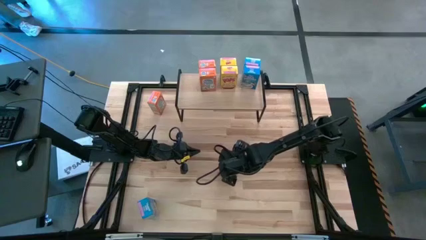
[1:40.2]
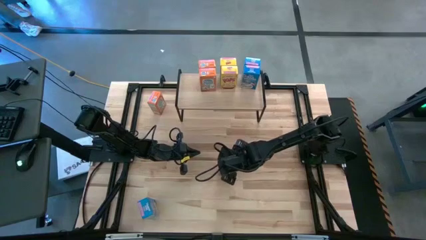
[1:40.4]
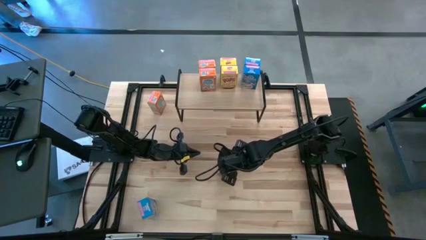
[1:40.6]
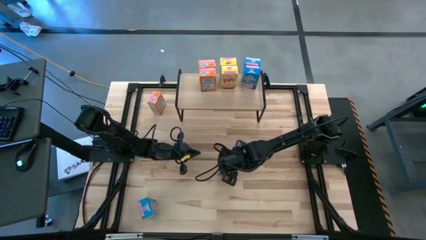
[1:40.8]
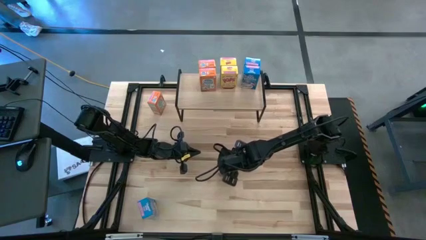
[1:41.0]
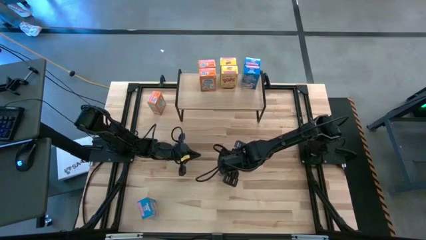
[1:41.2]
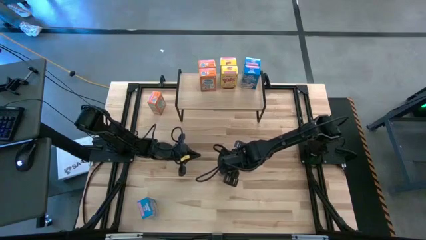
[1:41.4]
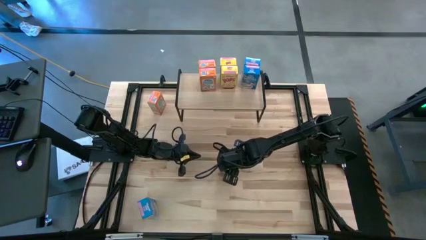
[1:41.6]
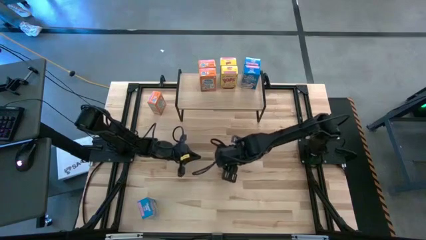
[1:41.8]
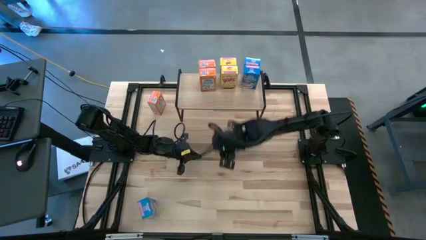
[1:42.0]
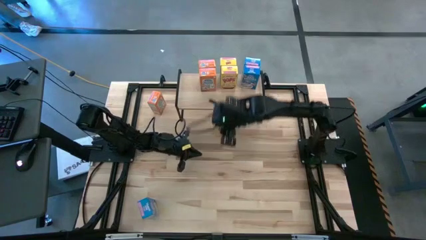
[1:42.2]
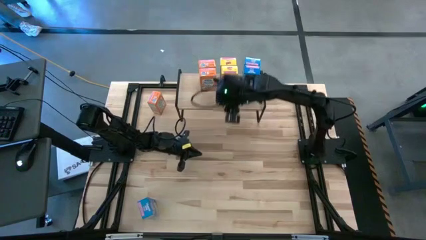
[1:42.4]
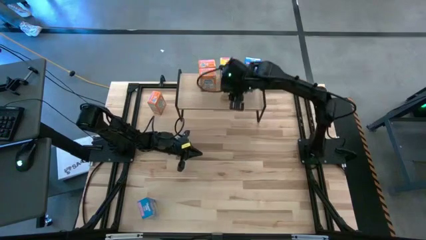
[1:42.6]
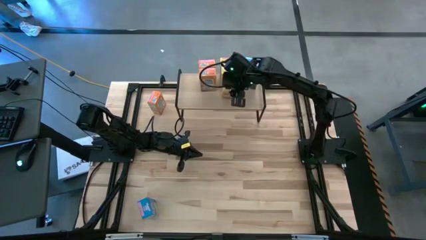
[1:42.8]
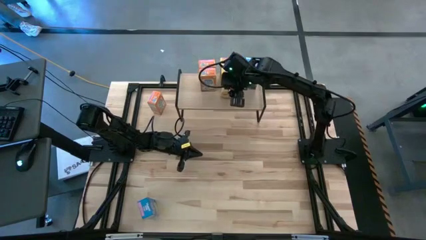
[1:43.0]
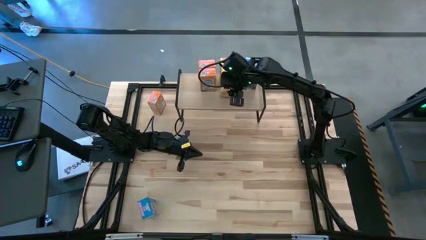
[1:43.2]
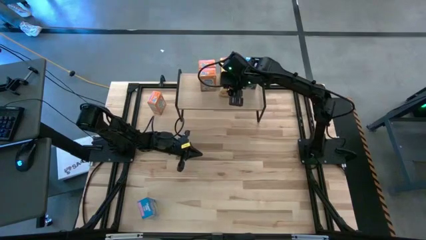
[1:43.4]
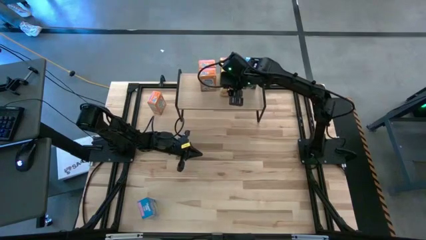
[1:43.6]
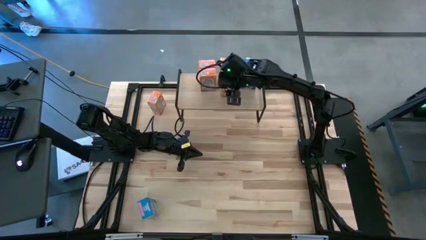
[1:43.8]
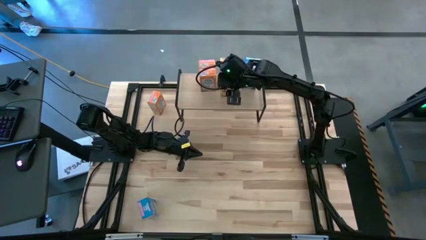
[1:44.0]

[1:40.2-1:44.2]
Task: Stack cereal on shelf
Put the yellow cereal box on the shelf aligned with the other yellow cereal box

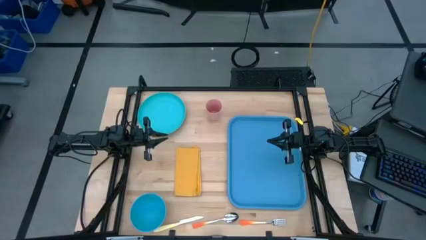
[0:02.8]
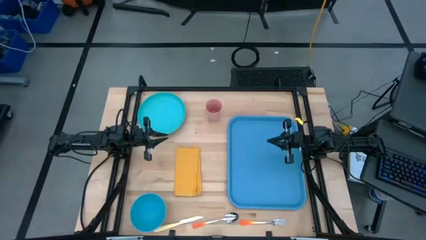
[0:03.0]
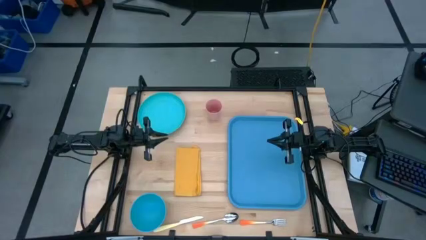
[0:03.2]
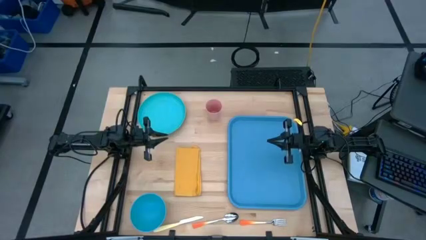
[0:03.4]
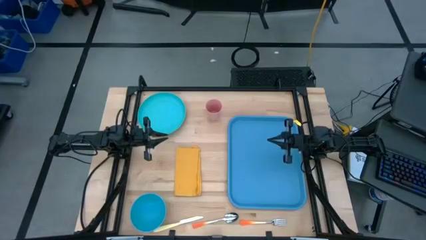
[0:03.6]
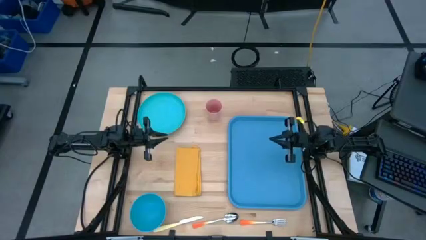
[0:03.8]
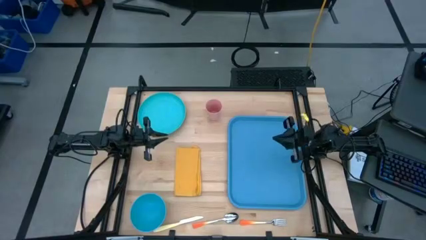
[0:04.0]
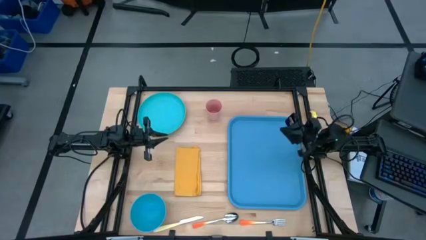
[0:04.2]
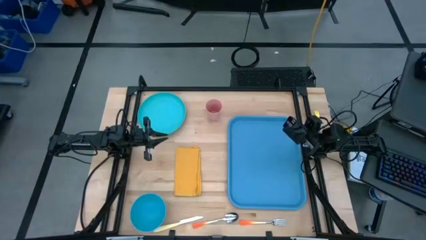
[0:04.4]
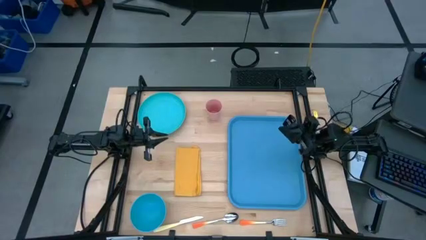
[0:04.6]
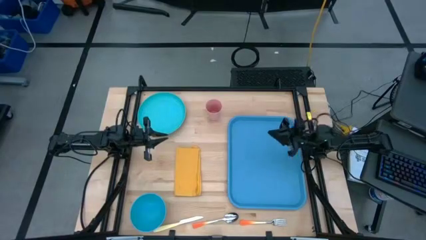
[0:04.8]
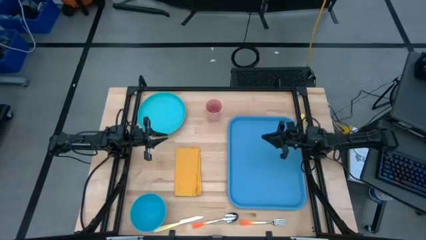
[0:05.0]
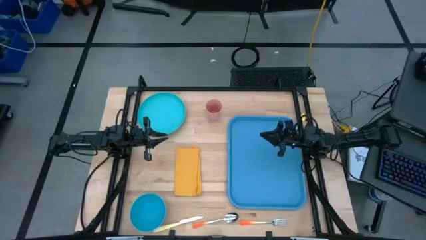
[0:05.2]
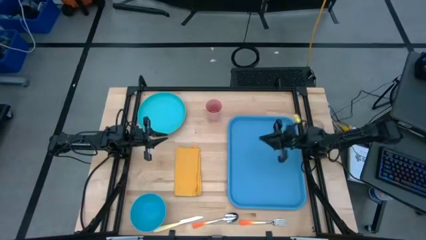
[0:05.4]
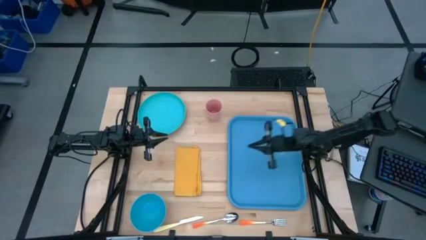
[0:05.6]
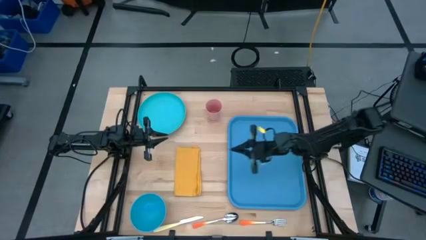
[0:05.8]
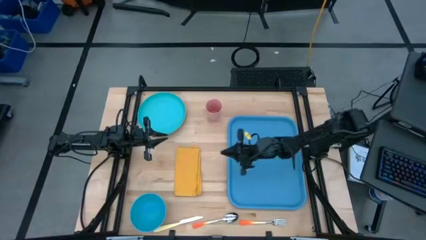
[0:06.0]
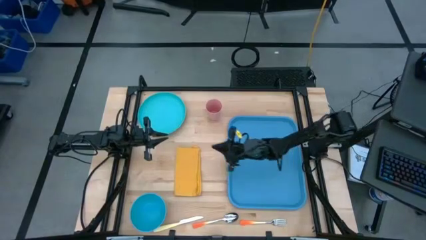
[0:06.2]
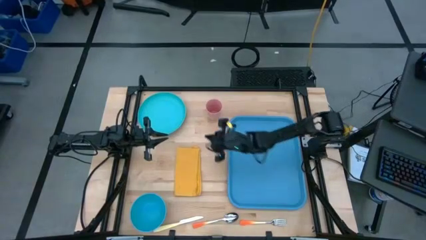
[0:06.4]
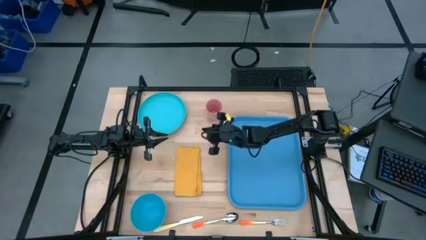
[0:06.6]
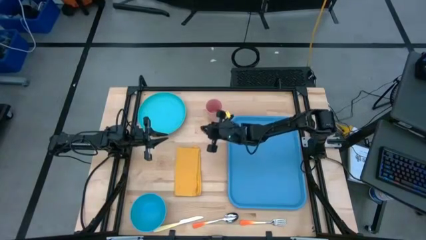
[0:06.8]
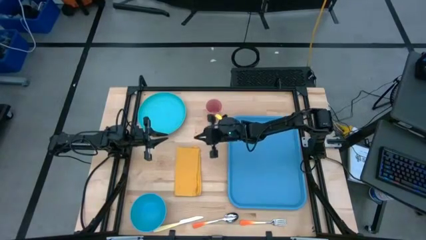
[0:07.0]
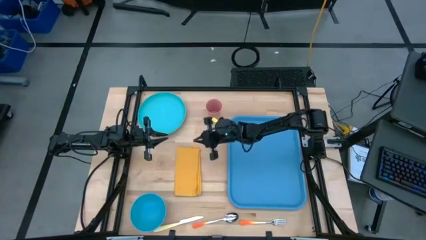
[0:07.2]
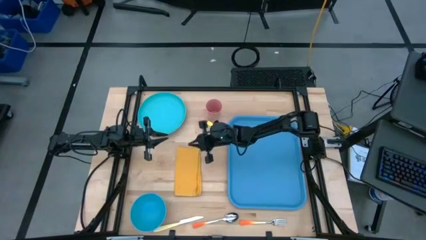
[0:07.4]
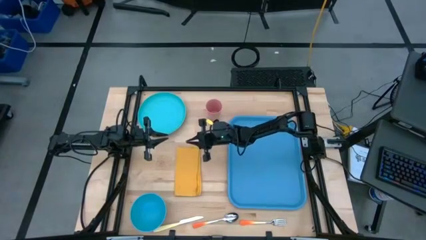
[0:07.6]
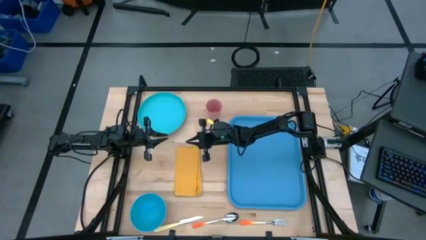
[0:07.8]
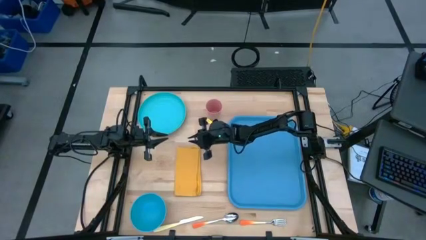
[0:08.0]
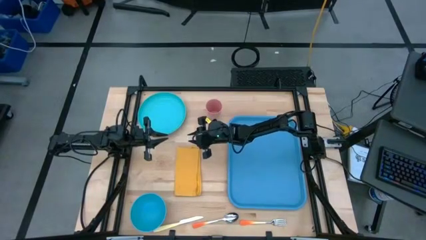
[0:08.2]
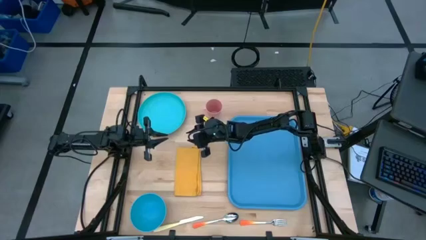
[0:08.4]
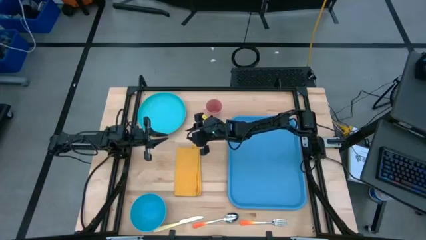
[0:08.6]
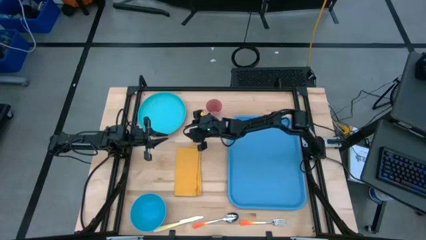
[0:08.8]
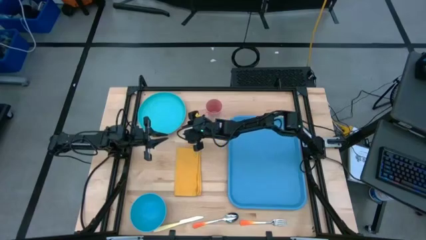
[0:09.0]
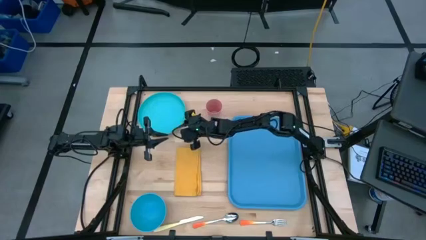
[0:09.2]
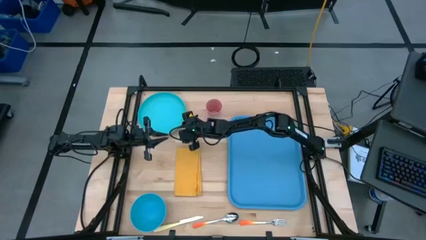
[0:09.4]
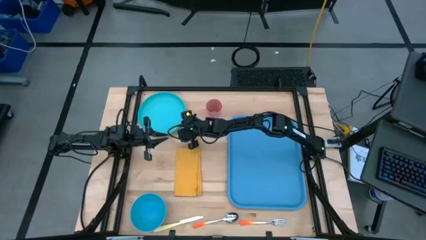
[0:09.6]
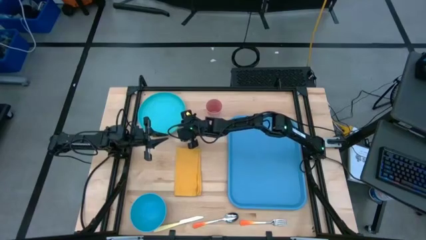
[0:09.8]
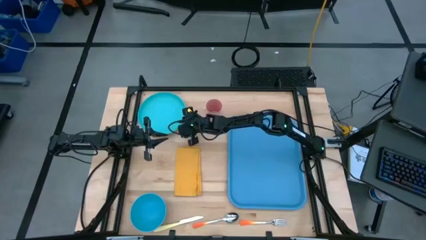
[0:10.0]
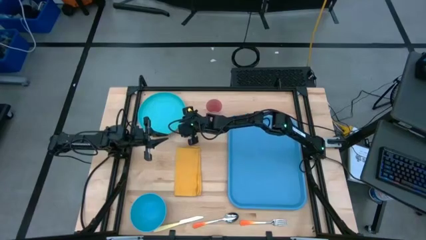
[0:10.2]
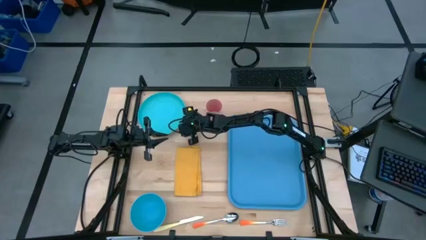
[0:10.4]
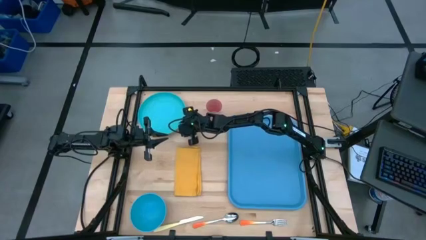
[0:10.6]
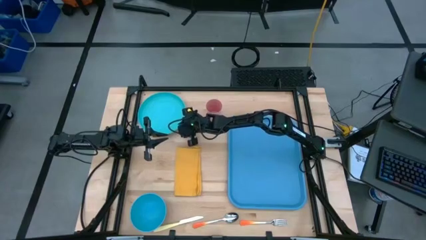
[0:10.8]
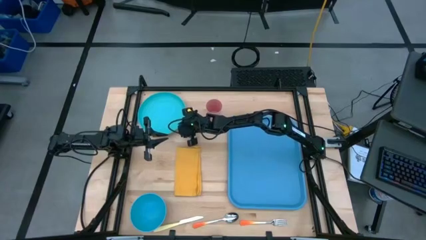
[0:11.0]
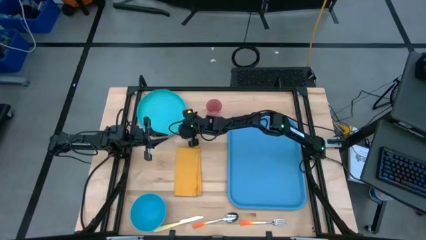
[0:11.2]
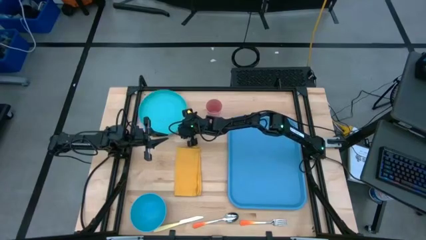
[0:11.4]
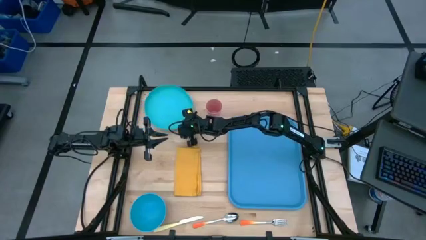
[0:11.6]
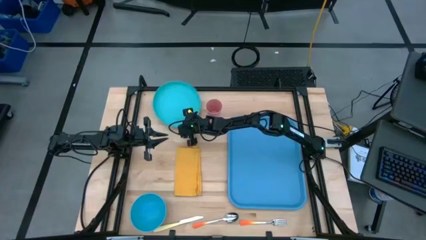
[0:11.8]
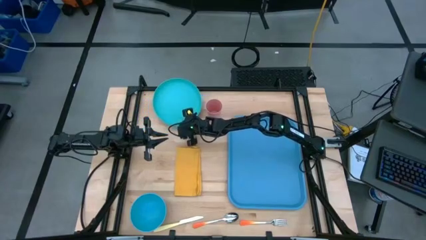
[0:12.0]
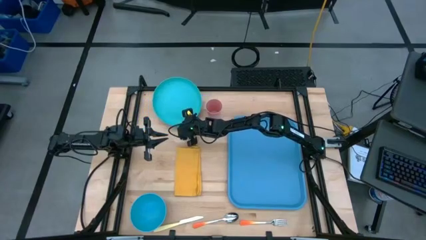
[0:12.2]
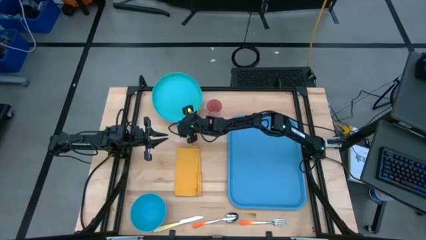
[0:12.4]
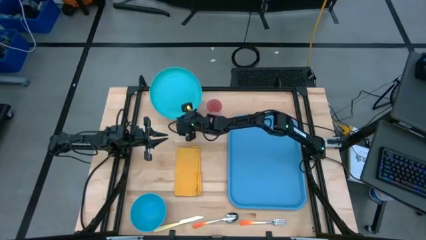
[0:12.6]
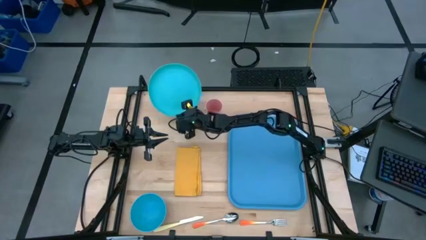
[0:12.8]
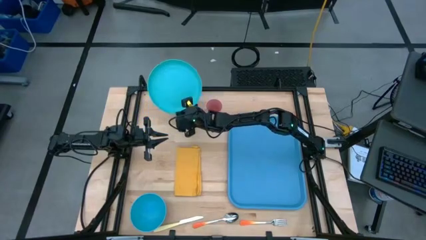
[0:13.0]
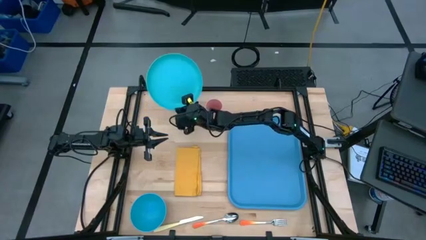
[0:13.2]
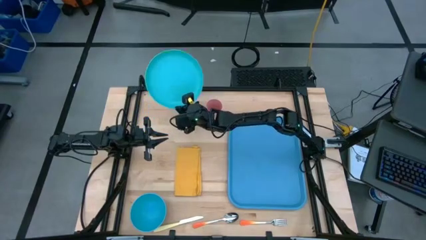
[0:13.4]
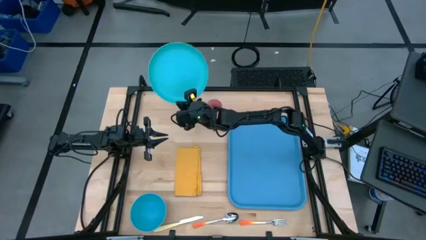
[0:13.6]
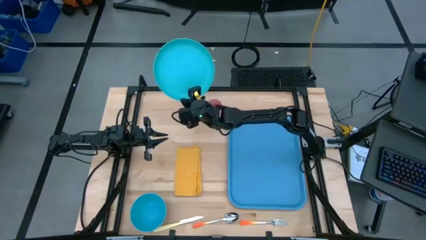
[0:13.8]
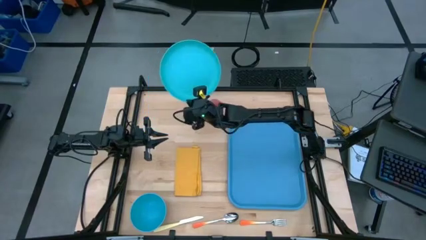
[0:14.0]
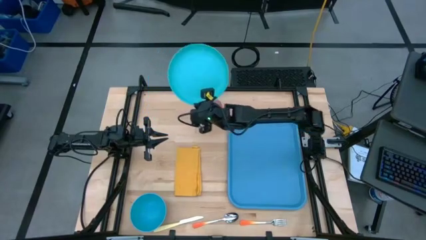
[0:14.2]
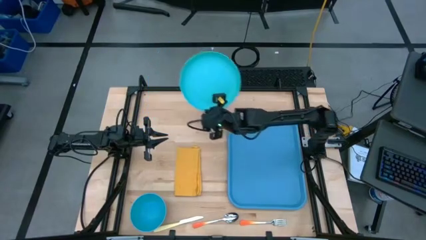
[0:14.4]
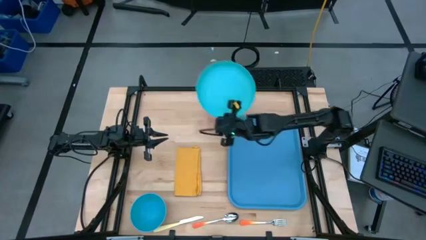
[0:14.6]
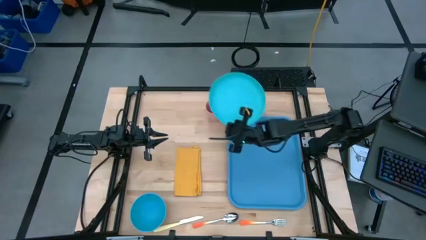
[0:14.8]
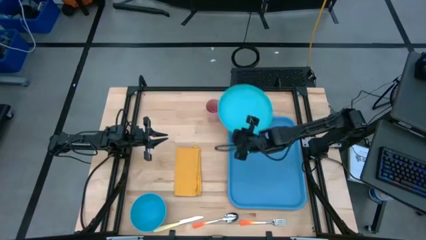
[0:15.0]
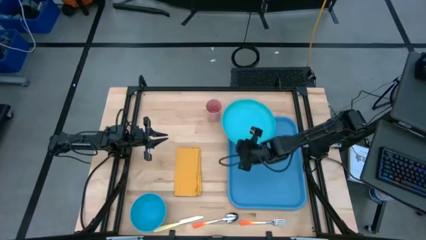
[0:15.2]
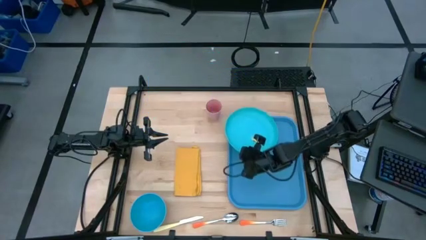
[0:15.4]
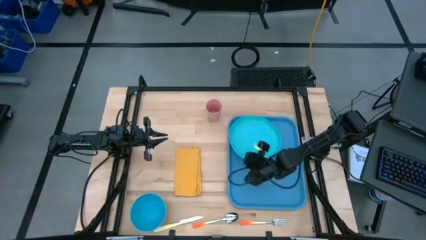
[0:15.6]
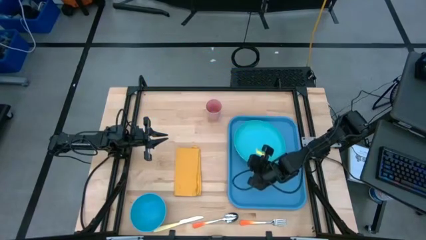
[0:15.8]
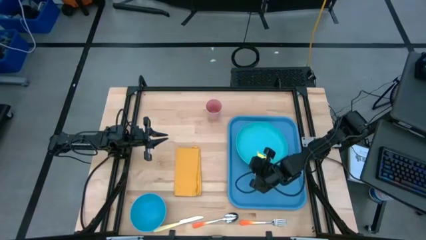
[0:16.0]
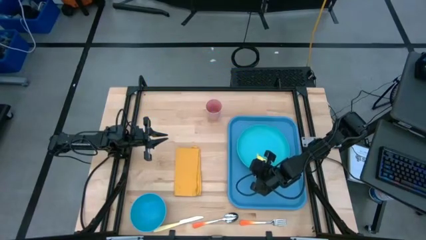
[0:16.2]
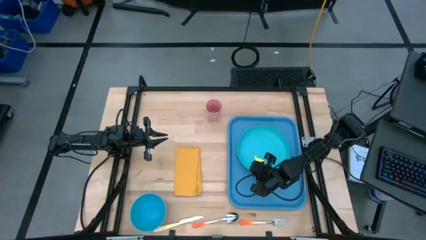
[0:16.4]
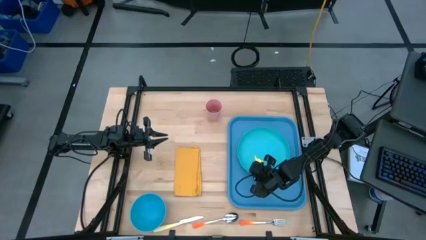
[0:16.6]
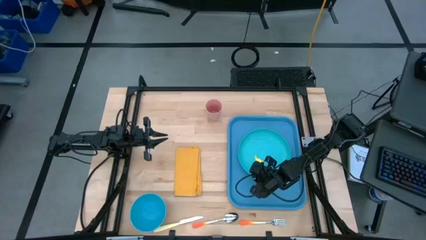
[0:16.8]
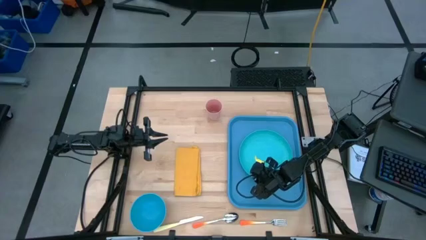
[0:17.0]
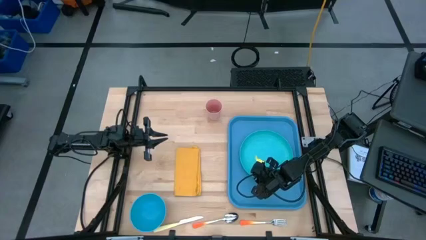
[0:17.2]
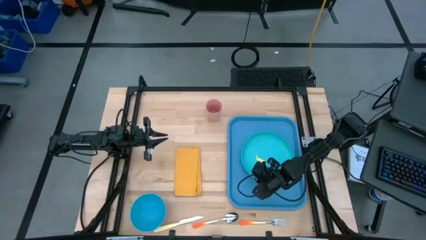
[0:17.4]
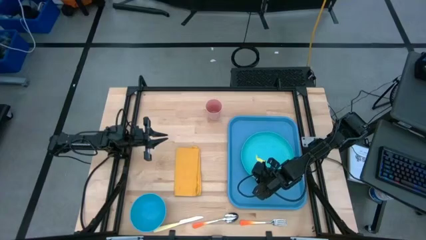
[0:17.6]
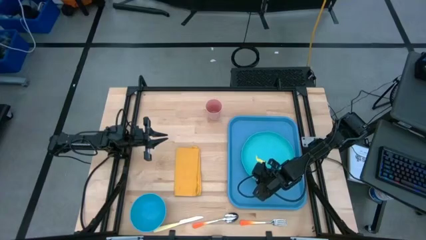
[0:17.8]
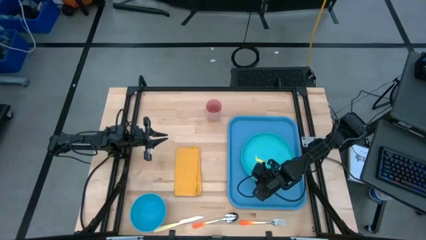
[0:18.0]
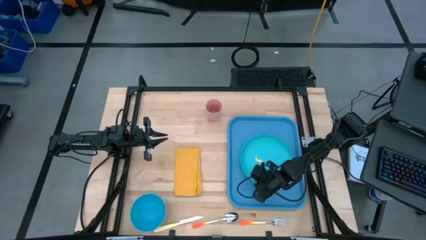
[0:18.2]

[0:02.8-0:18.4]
Task: Set up tray
Put the blue plate on the blue tray
